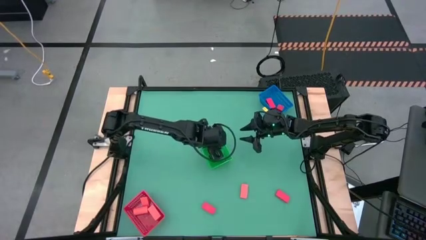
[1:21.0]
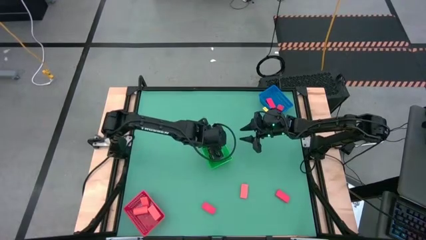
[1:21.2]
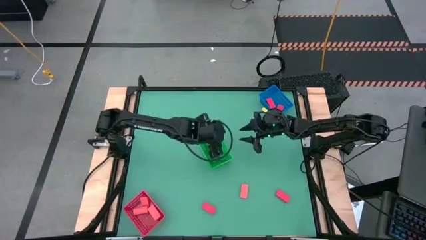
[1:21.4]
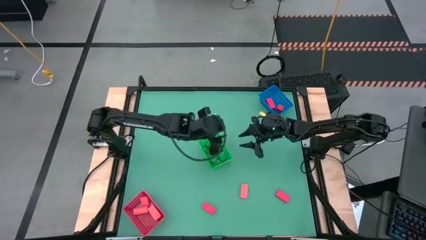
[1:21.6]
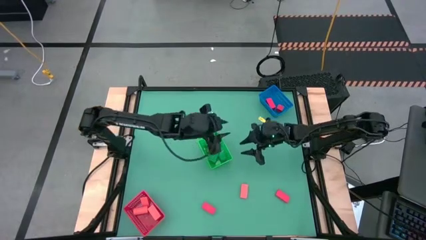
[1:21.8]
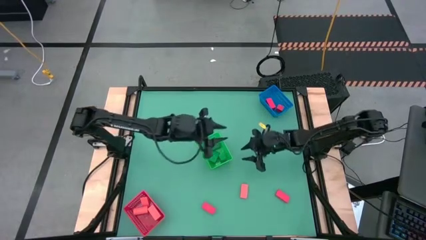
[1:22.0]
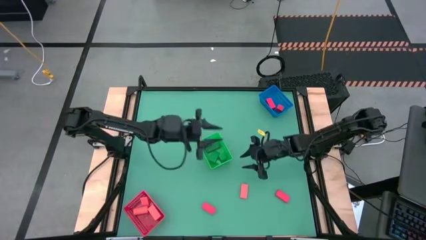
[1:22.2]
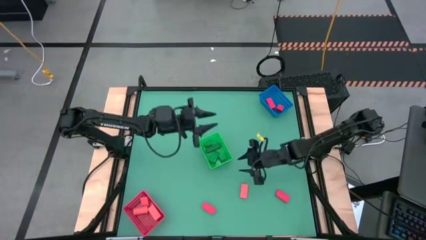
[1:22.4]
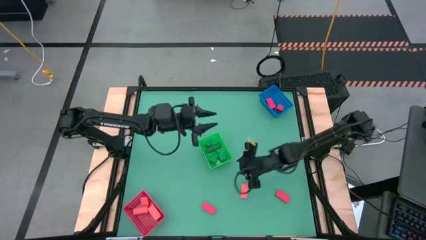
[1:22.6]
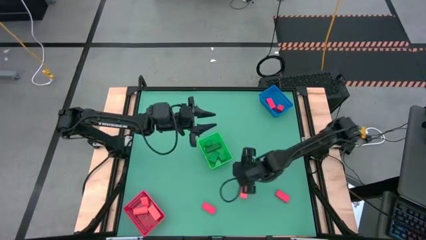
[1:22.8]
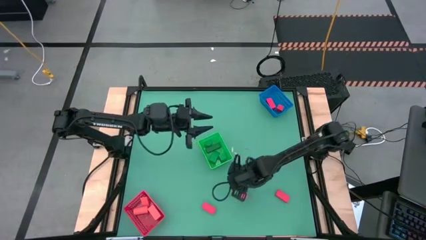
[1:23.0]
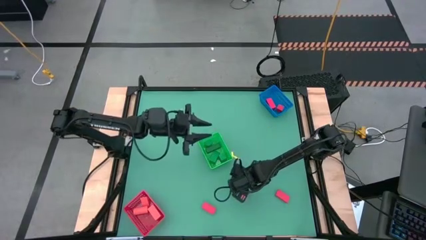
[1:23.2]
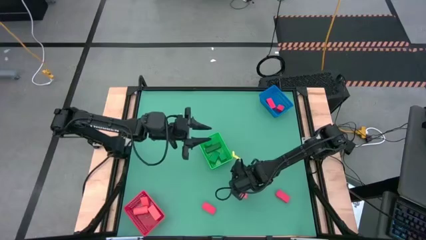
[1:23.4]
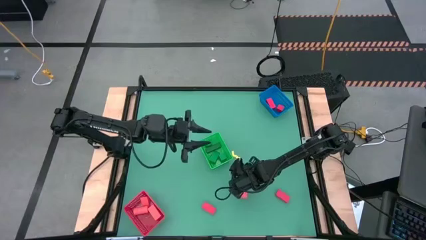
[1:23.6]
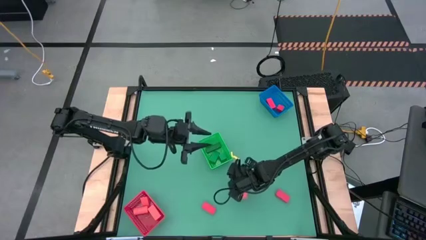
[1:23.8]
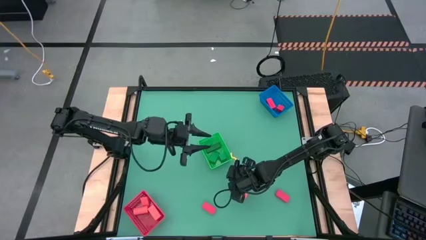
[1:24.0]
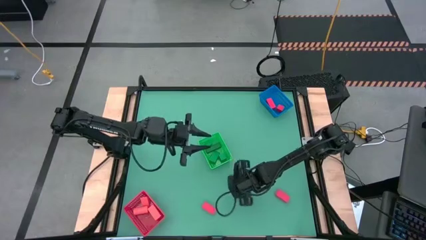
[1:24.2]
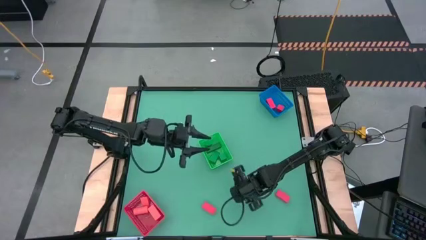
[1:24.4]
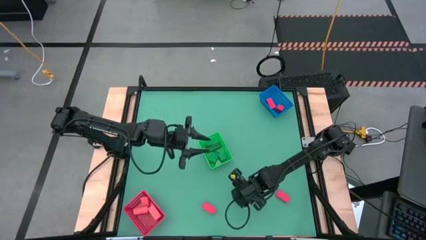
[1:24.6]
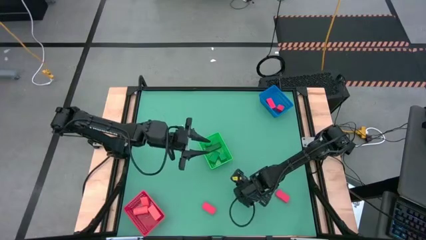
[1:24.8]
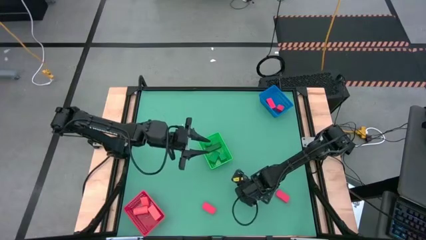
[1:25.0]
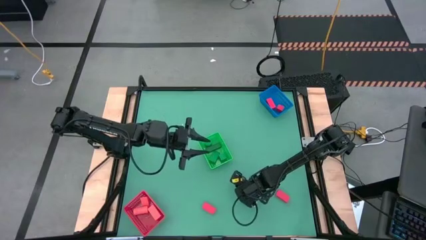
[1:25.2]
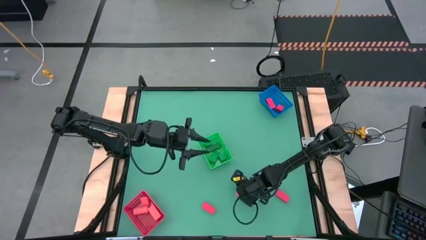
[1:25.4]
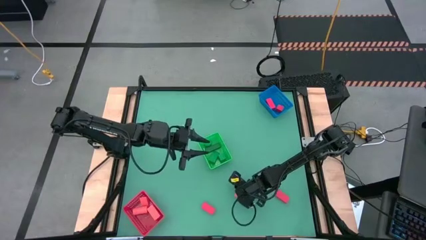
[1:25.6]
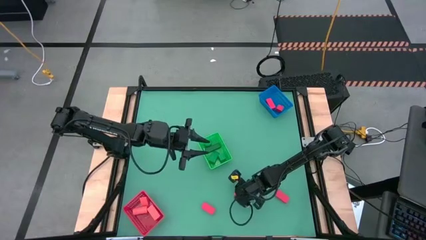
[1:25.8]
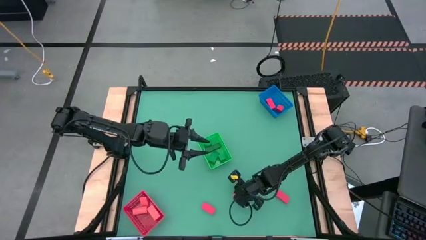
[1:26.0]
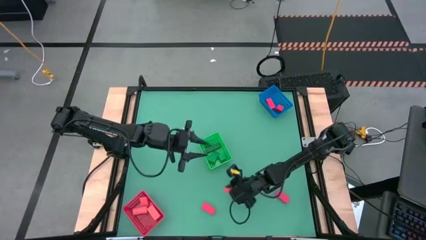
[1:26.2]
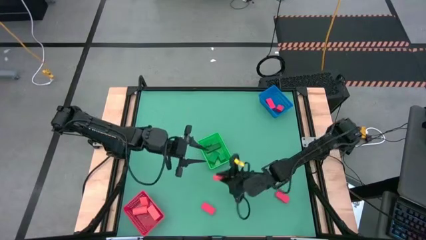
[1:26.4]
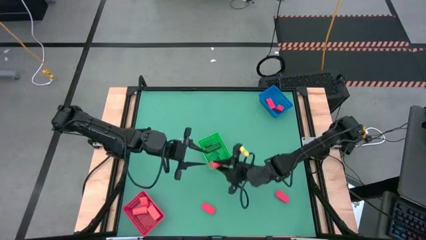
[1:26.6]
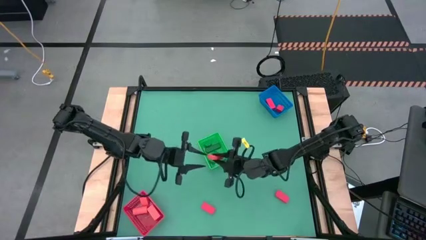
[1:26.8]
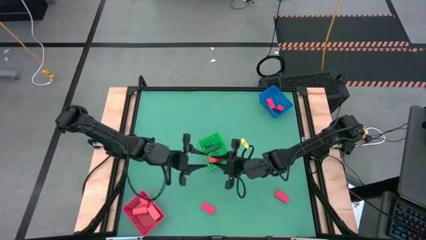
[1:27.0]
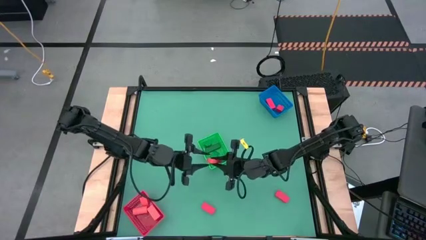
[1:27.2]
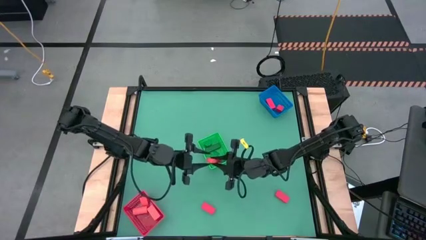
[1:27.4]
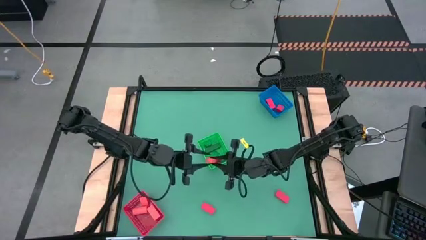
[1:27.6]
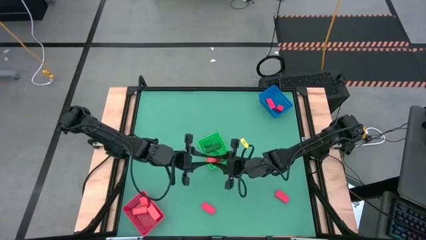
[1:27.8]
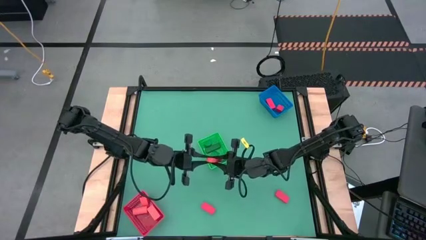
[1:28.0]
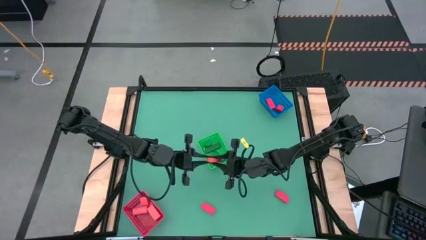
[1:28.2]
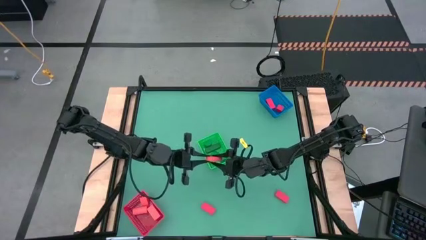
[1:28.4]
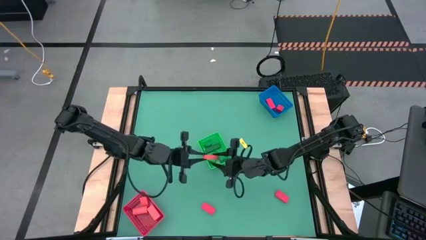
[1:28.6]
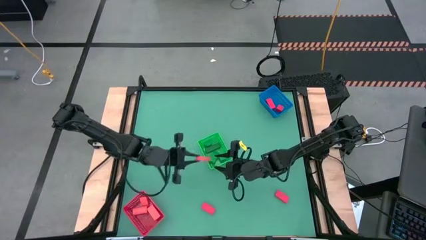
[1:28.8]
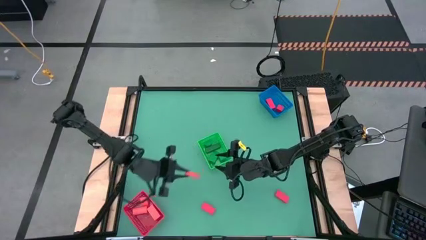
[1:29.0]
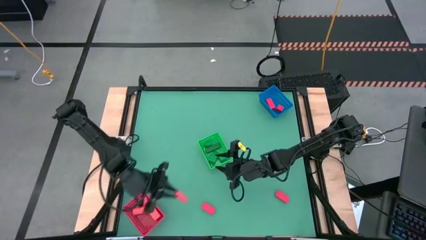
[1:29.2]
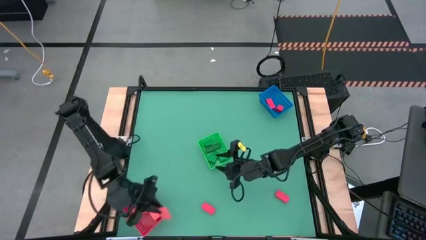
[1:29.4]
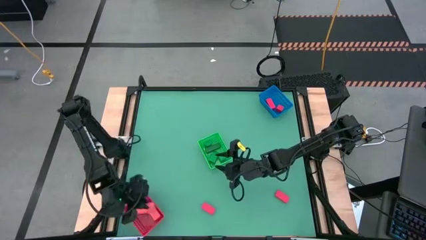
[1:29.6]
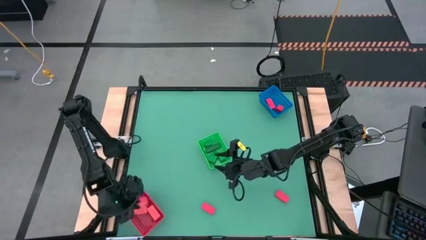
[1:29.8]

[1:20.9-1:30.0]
Task: Sort & place blocks by color
Put the pink block into the red bin

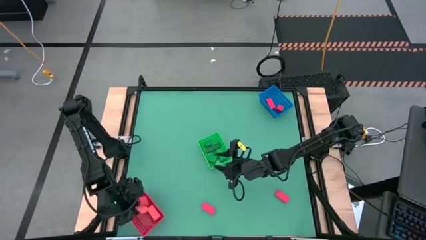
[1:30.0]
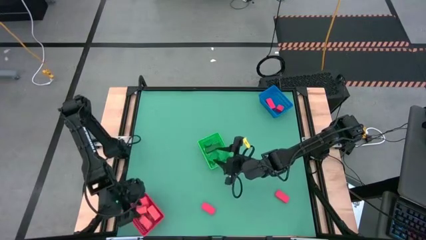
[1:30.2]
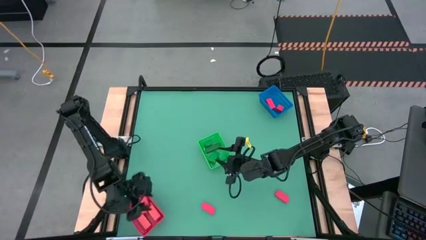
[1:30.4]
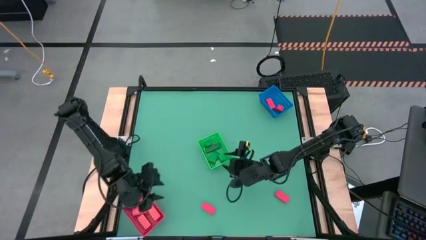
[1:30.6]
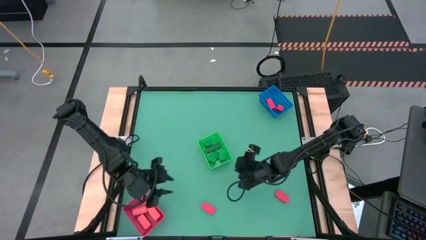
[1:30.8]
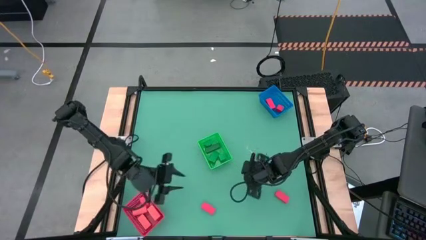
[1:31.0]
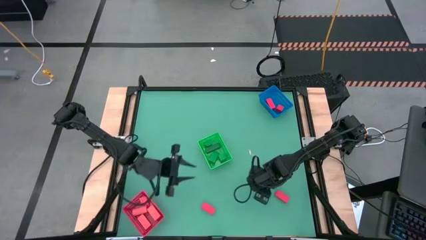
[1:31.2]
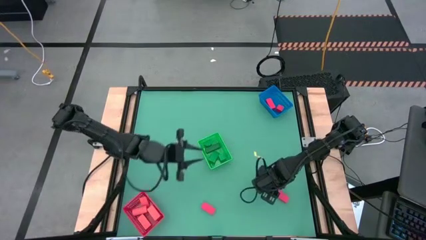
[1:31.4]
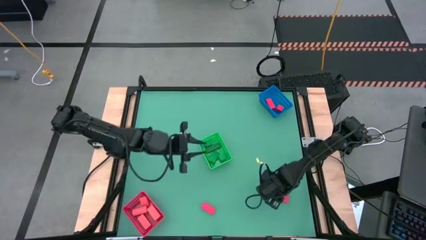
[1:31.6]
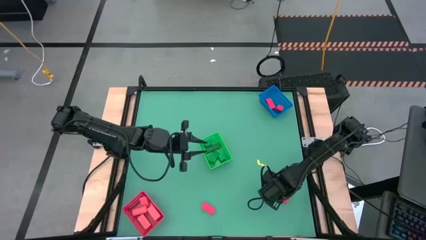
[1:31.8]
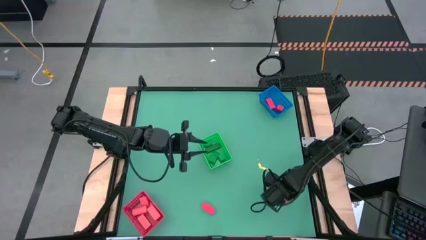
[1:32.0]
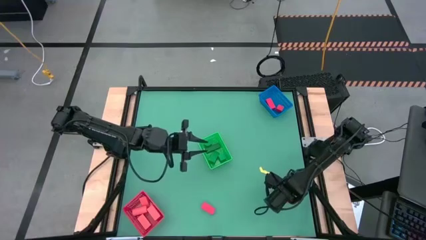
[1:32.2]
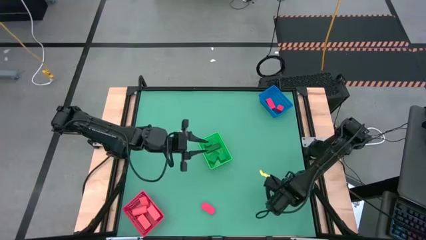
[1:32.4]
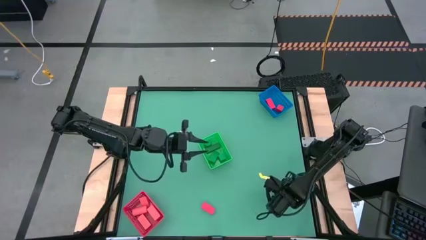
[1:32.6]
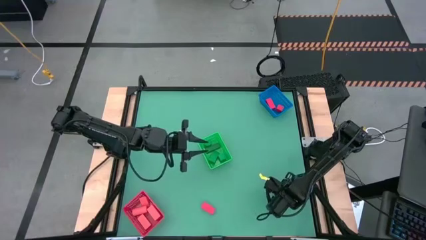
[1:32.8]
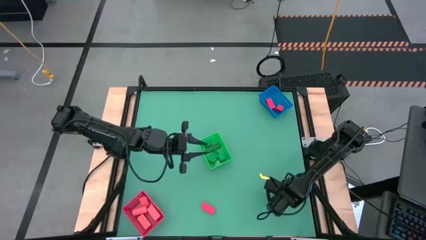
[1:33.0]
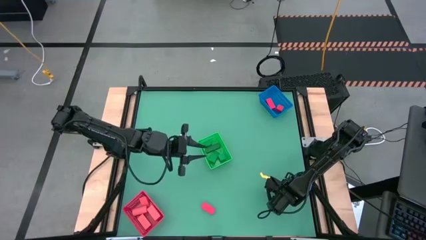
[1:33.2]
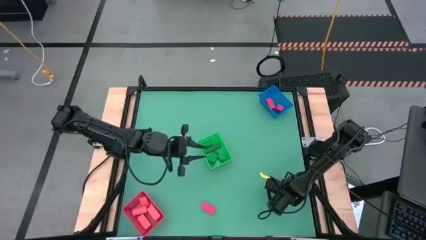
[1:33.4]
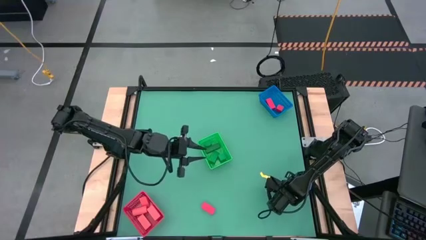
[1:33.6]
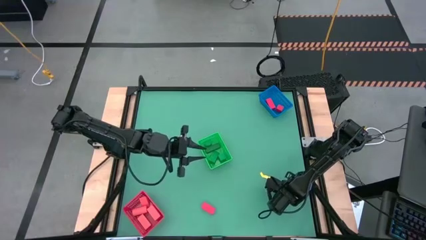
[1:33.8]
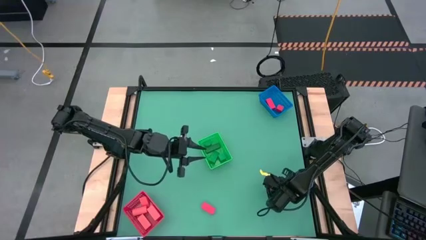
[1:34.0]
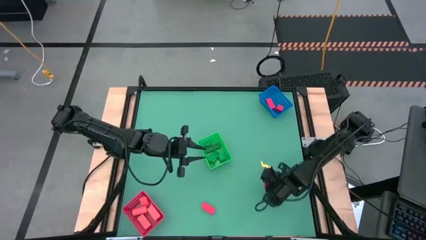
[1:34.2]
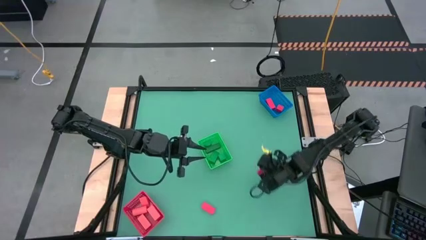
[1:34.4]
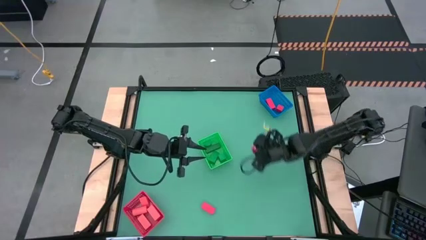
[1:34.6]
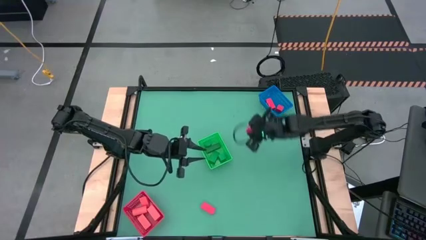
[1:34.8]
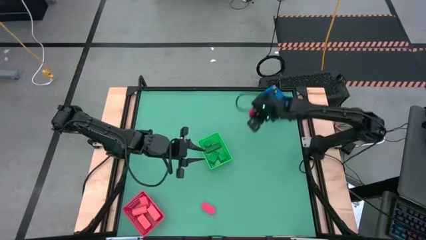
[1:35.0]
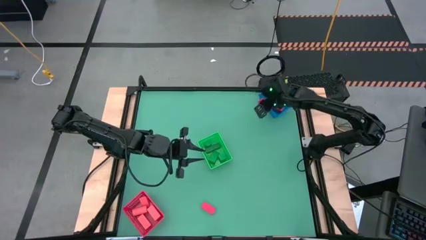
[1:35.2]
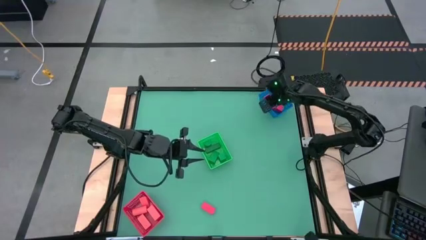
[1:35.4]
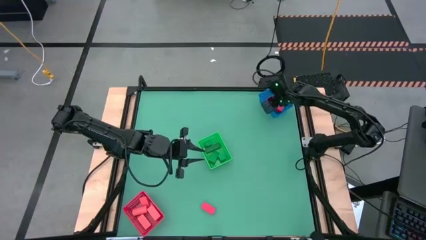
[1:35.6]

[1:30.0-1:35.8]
Put the light pink block into the blue bin
